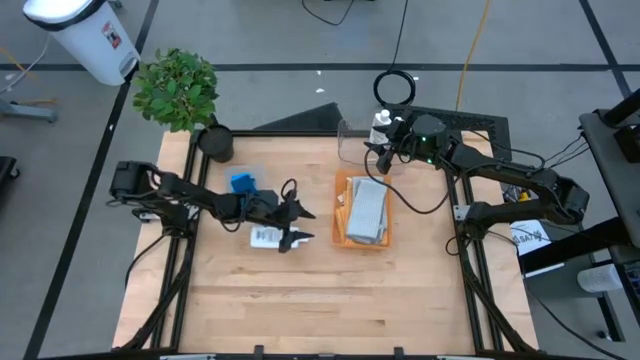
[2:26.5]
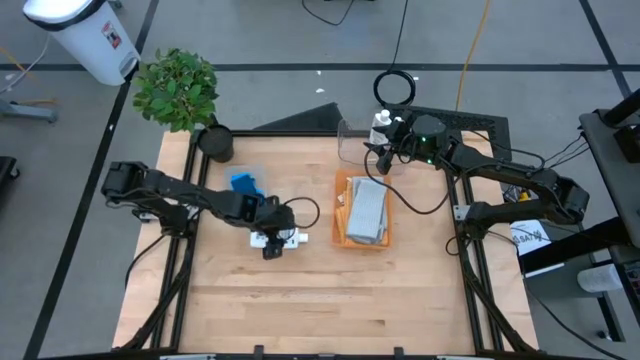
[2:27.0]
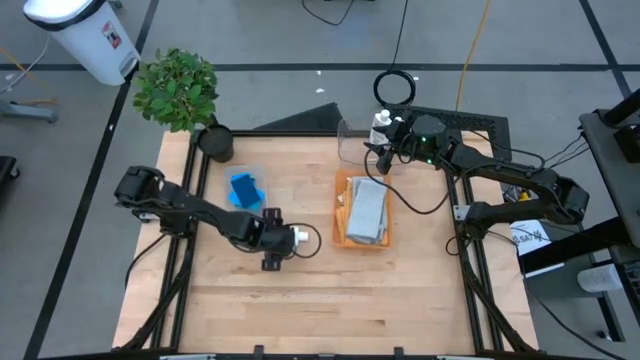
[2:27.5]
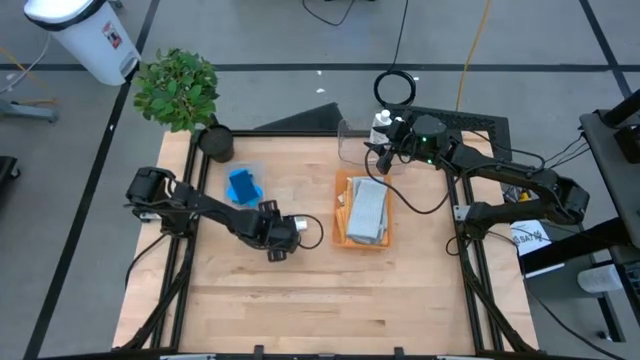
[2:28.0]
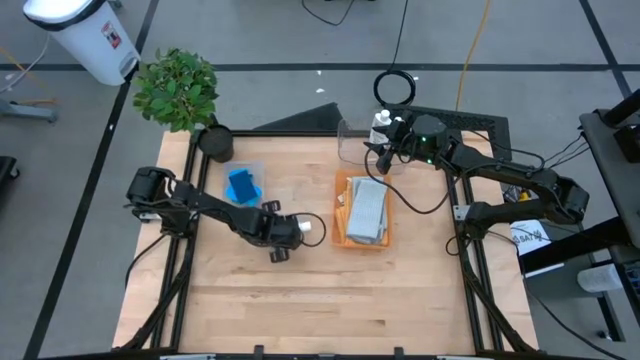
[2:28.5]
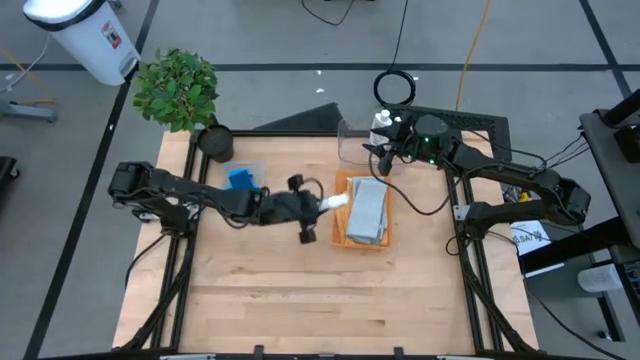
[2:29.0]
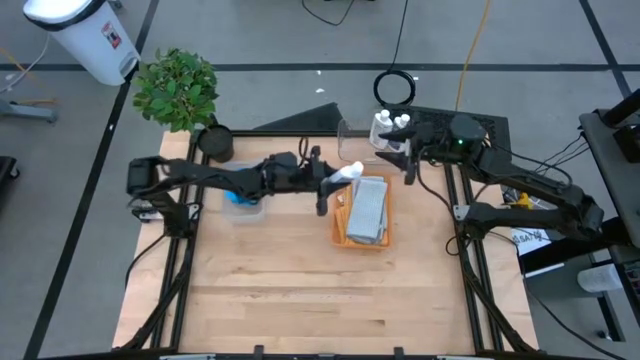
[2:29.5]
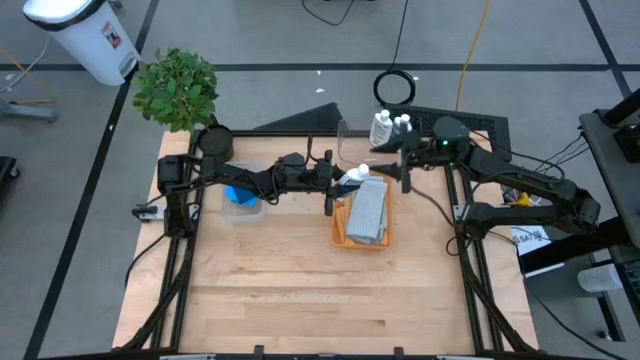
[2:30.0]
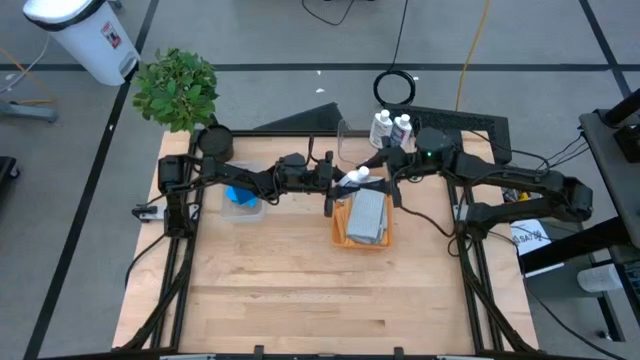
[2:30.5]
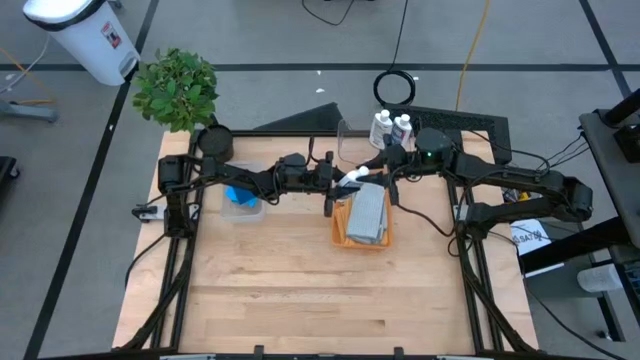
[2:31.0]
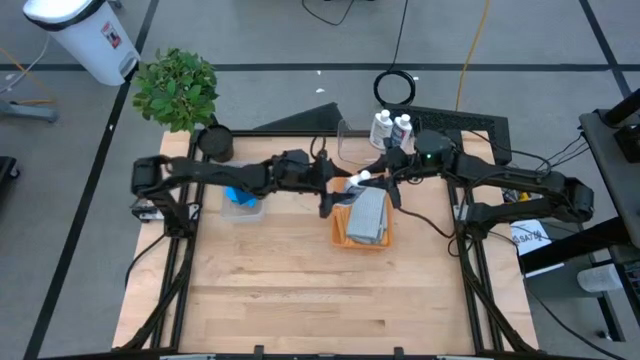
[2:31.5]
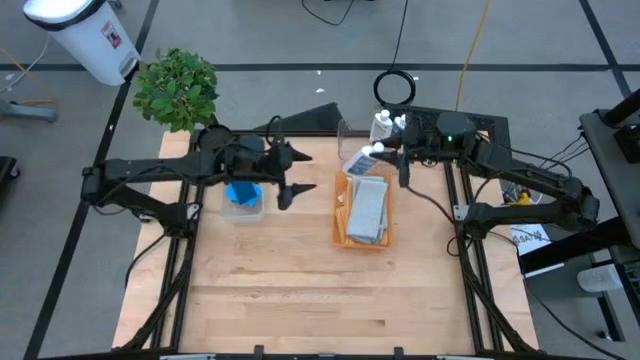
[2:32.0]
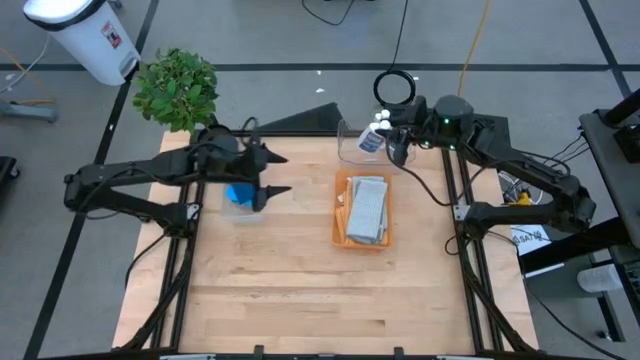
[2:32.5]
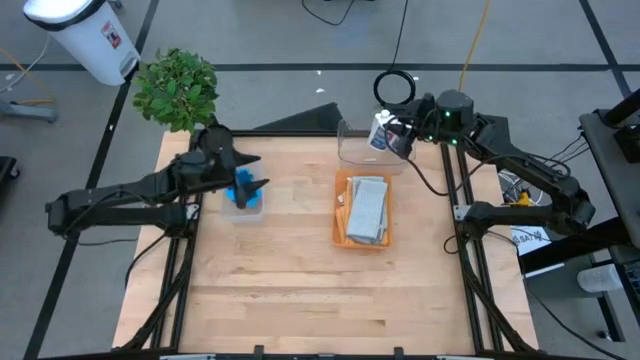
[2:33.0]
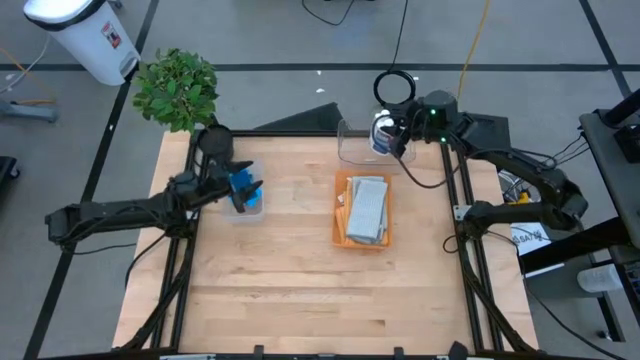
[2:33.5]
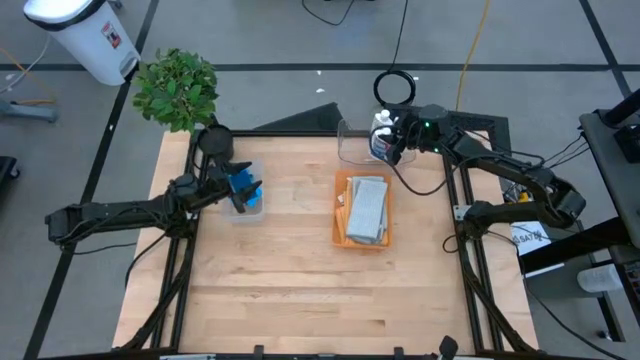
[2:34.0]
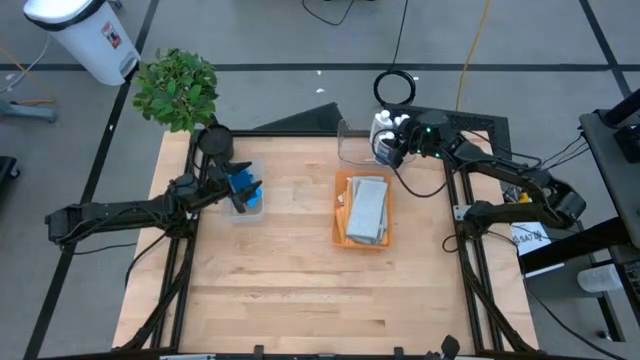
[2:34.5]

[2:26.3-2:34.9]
Task: Pick & Place Kitchen Items
Put the white plastic restorer bottle into the transparent bin

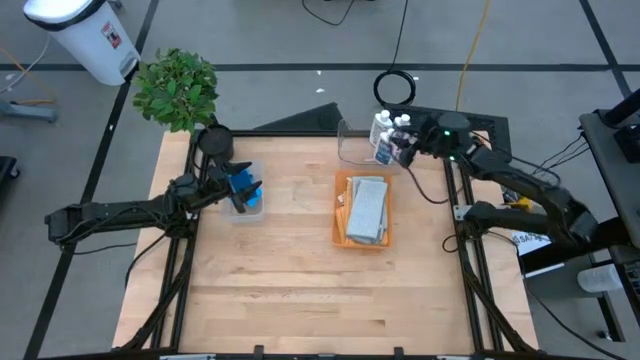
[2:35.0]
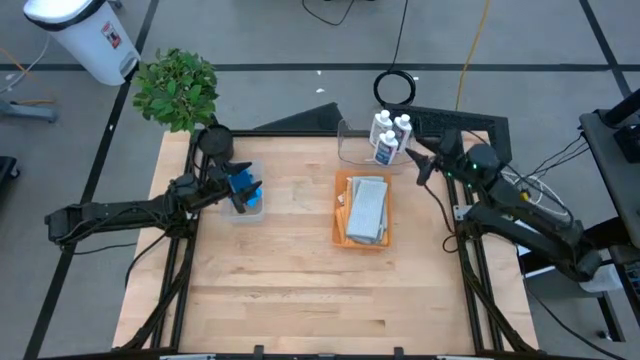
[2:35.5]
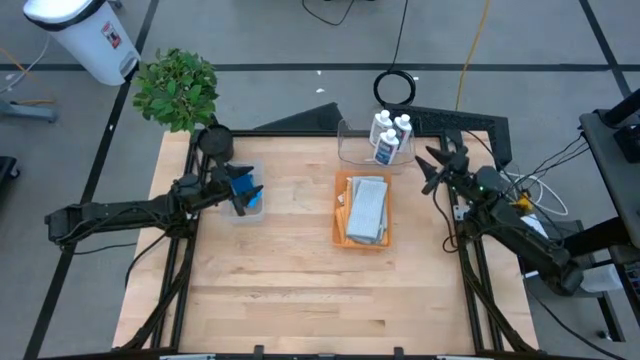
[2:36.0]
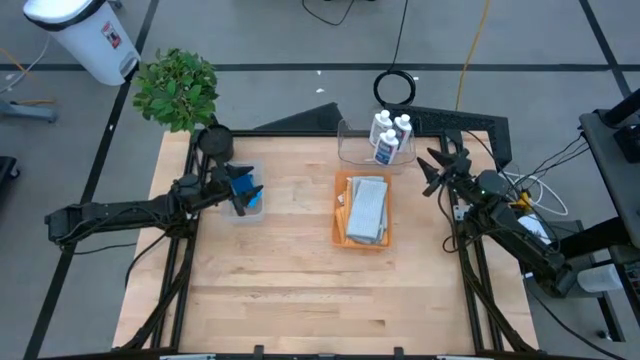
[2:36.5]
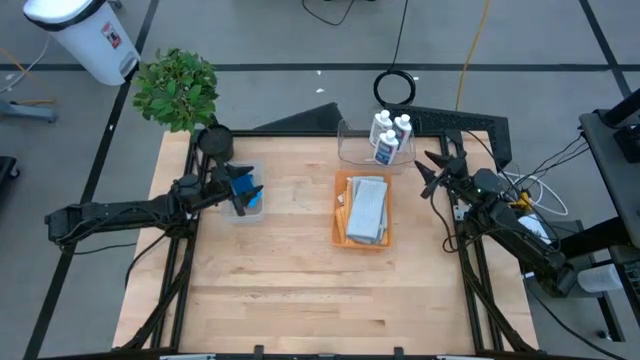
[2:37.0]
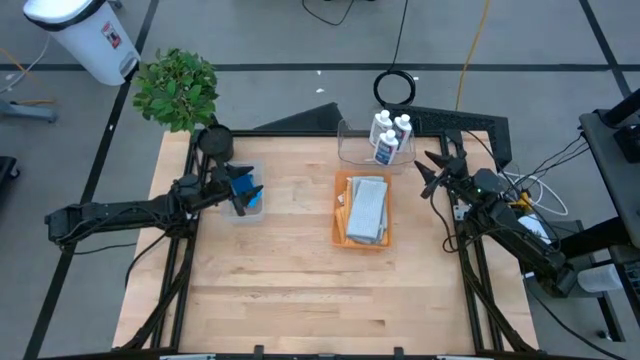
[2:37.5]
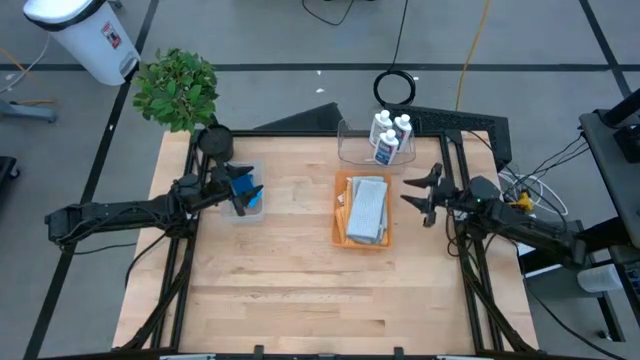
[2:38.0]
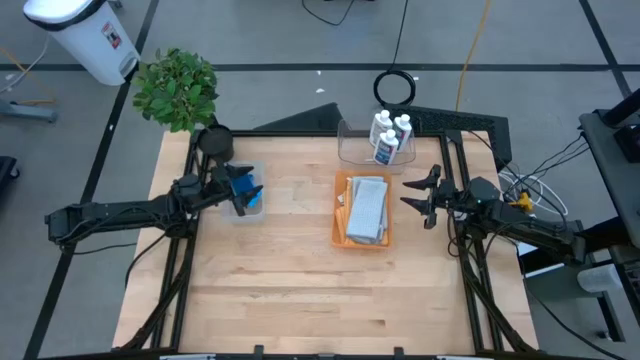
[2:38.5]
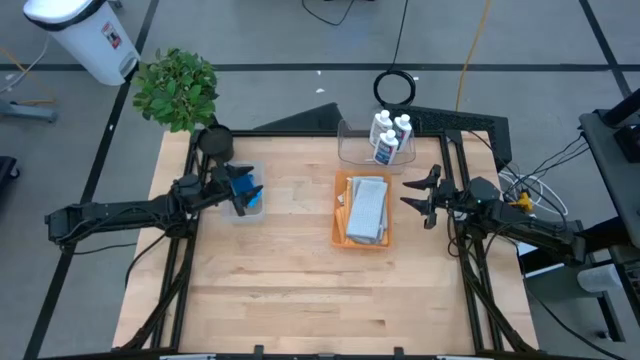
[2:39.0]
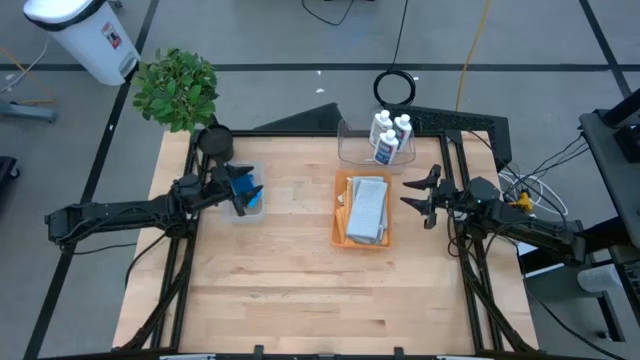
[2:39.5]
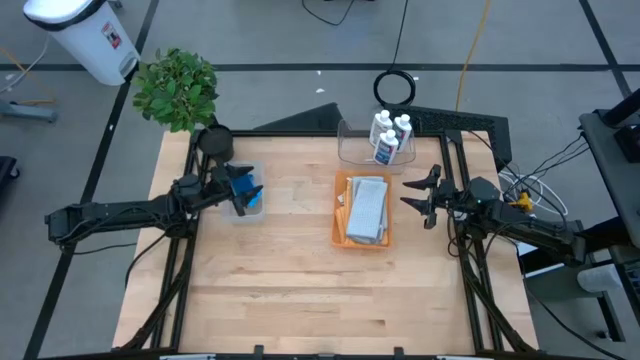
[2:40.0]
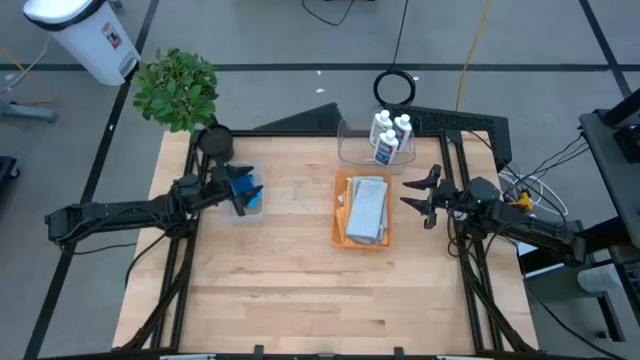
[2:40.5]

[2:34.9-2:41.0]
Return to Home Position

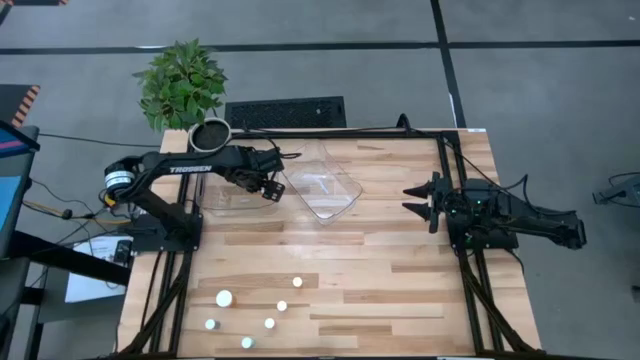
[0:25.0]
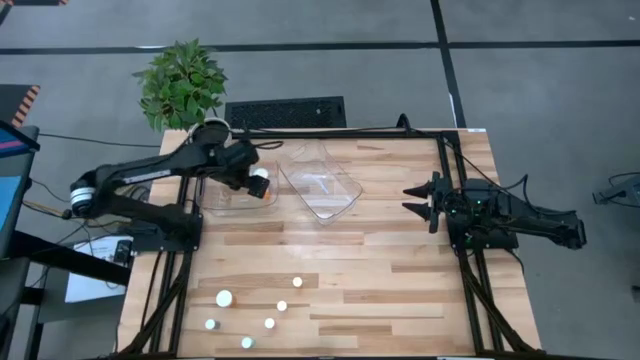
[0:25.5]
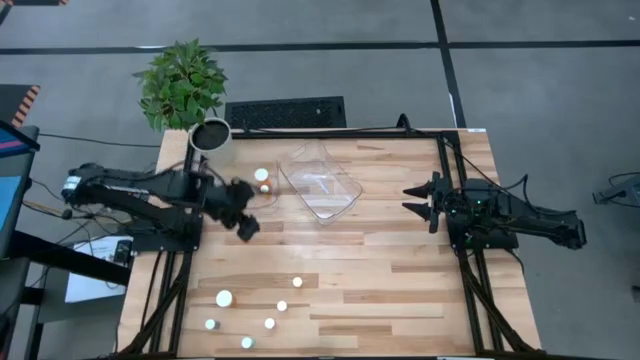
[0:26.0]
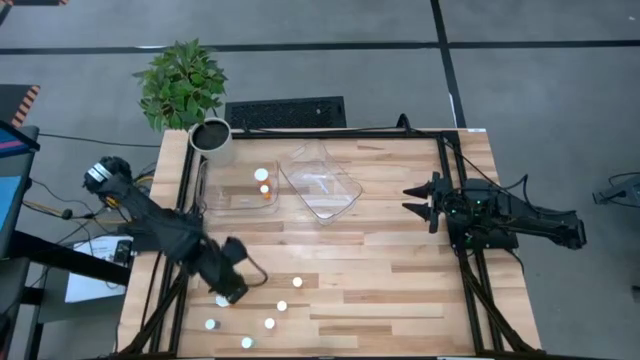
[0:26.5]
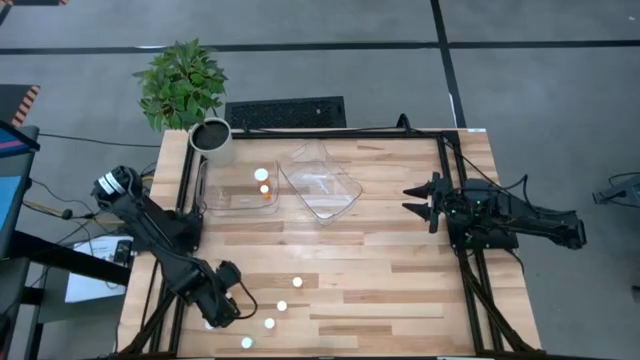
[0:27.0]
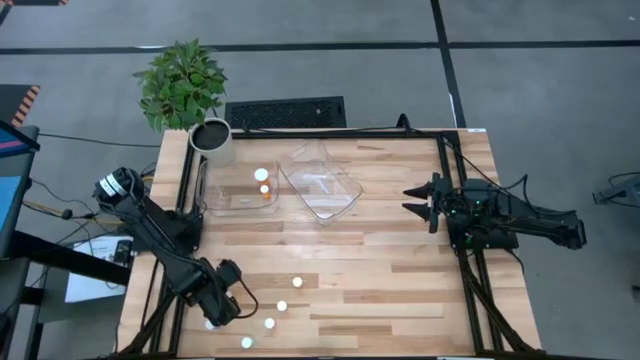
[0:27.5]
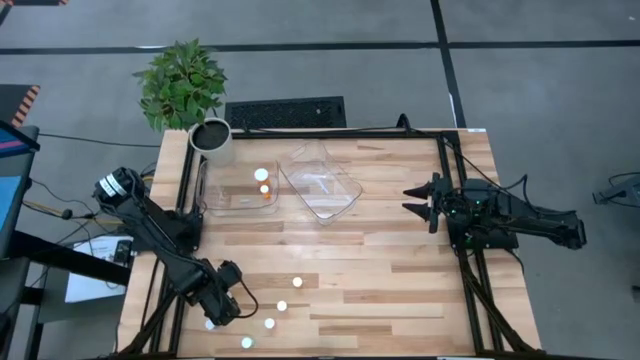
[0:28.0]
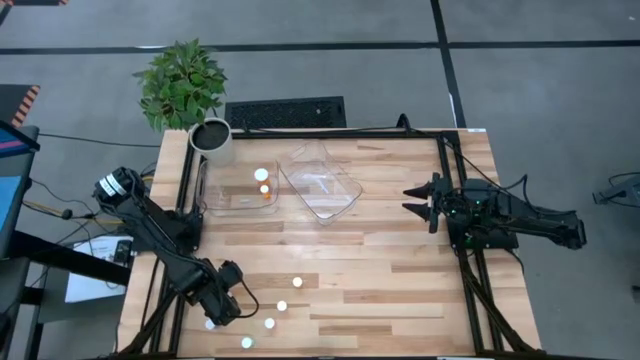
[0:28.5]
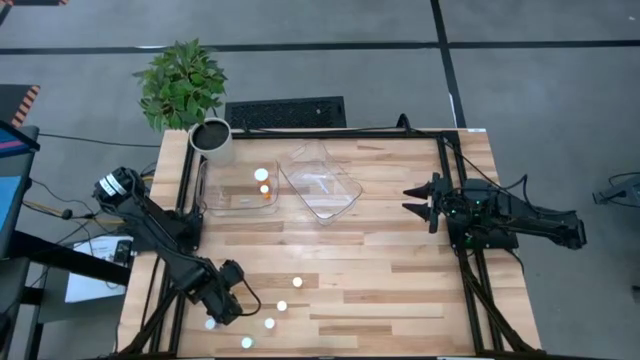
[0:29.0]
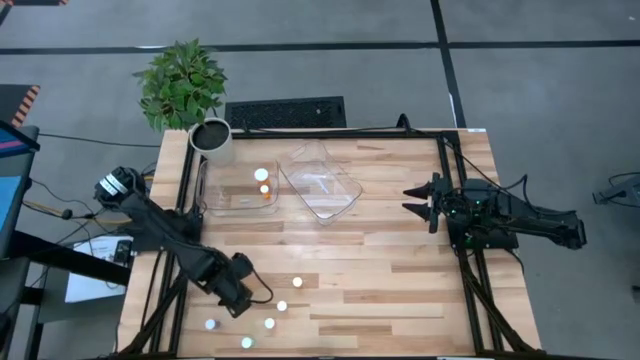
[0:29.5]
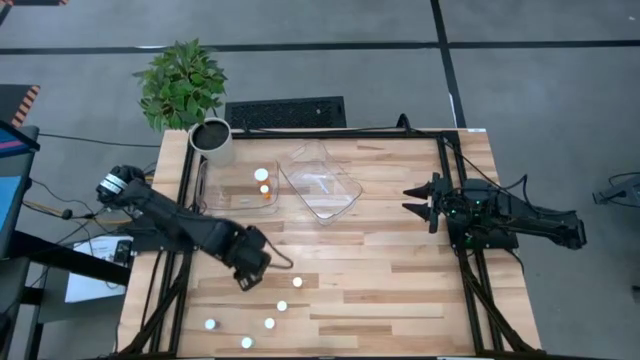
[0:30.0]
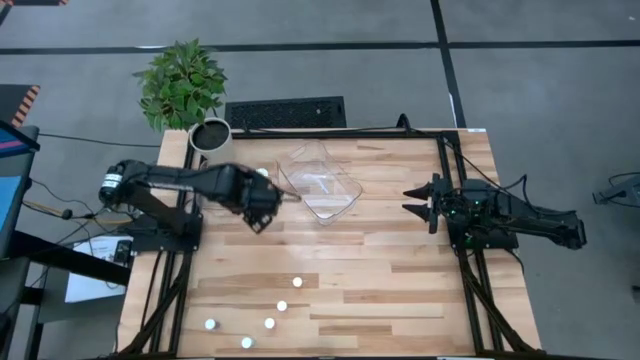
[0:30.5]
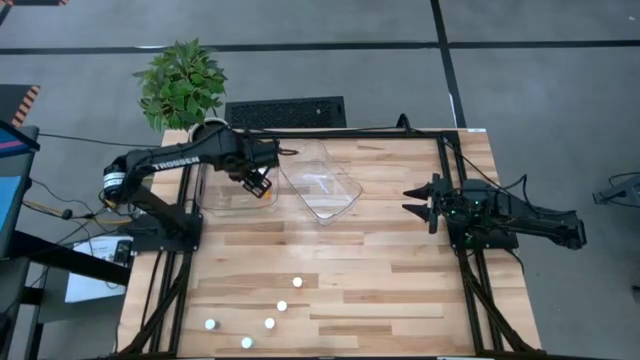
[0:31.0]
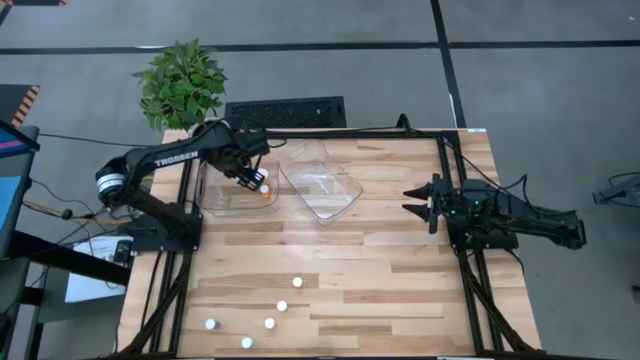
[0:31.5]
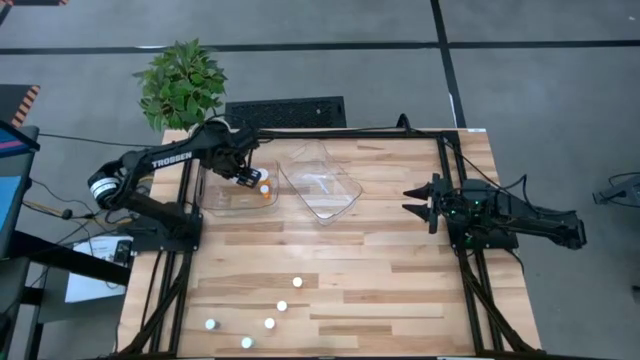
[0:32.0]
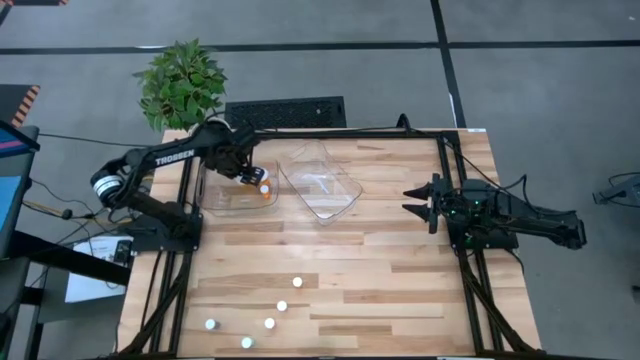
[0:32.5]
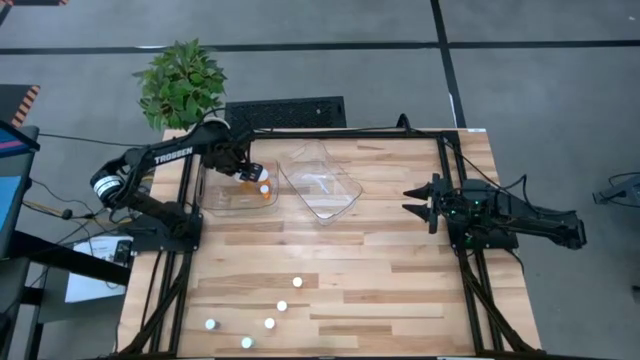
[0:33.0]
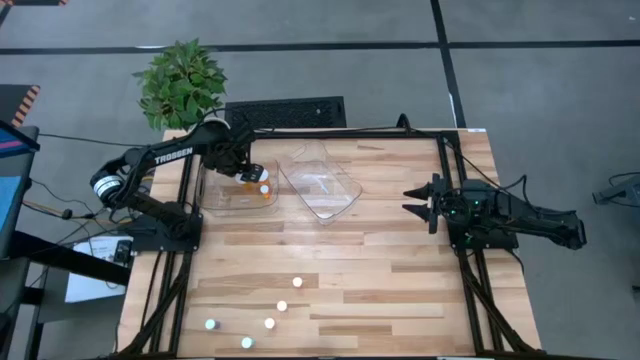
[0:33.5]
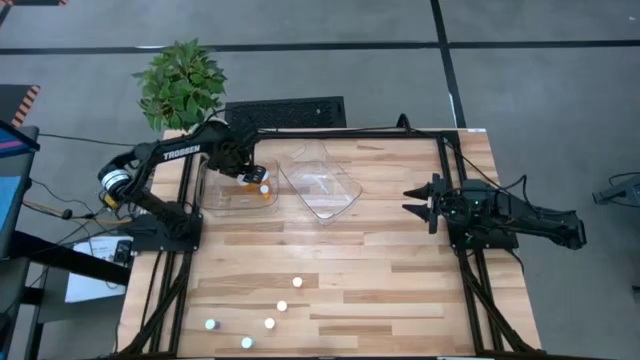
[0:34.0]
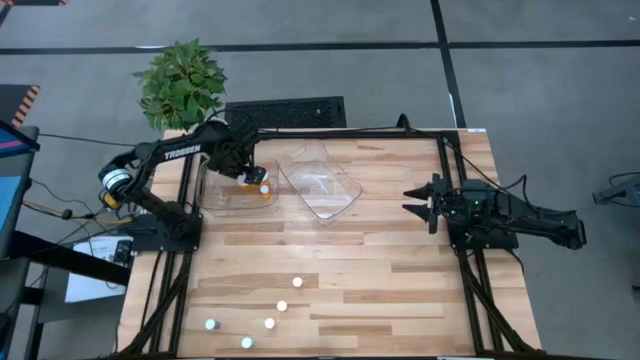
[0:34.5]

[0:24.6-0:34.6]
Task: Pick and place medicine bottles into bin by pill shape (circle, oval)
Put the large orange capsule bottle into the left transparent bin
